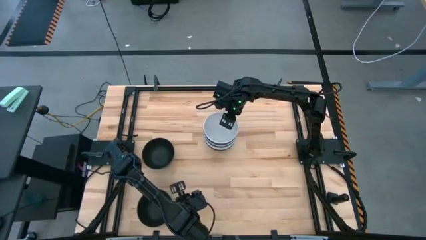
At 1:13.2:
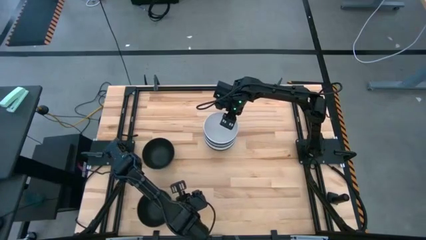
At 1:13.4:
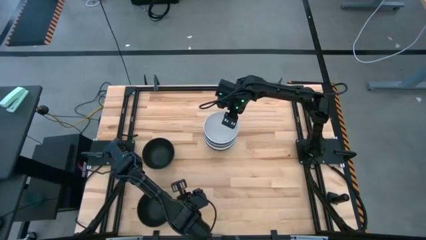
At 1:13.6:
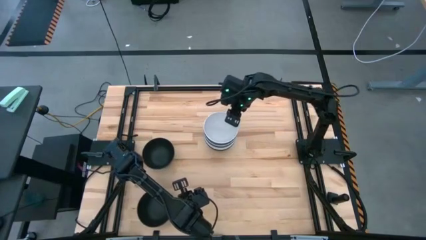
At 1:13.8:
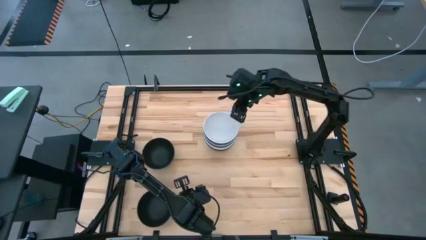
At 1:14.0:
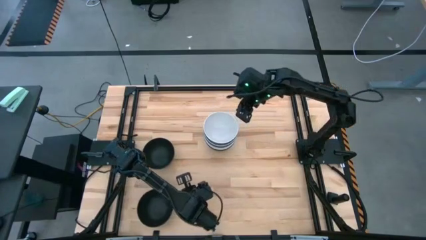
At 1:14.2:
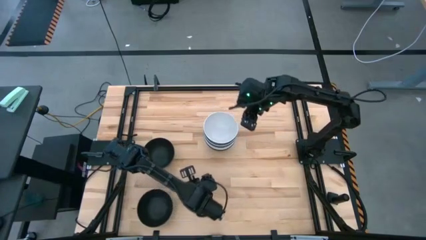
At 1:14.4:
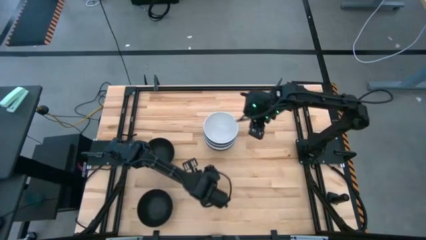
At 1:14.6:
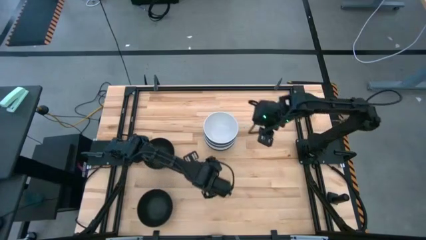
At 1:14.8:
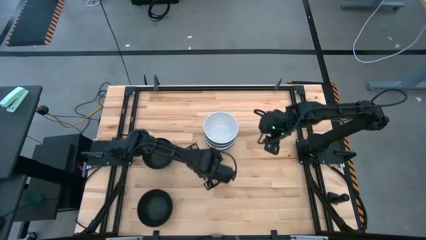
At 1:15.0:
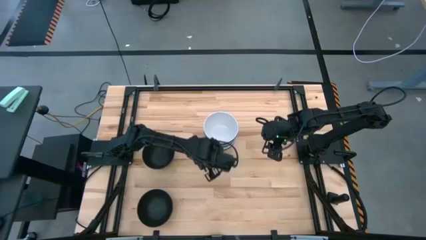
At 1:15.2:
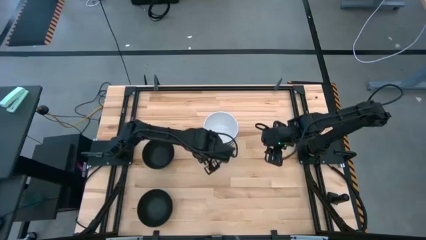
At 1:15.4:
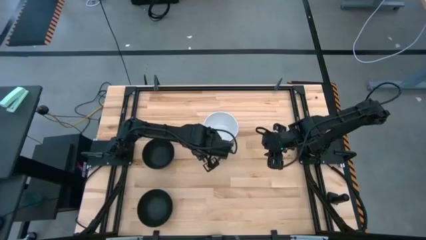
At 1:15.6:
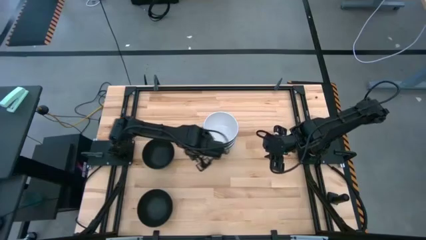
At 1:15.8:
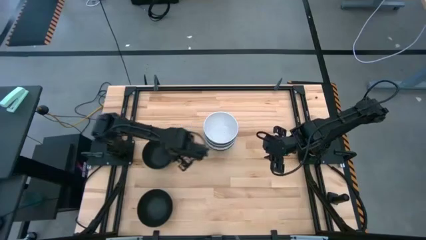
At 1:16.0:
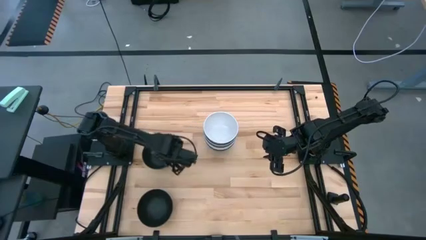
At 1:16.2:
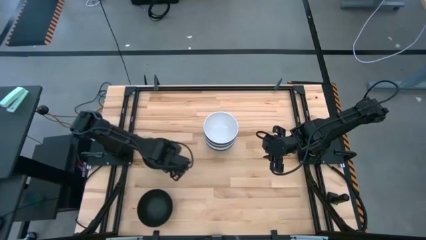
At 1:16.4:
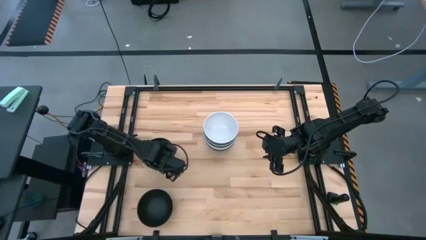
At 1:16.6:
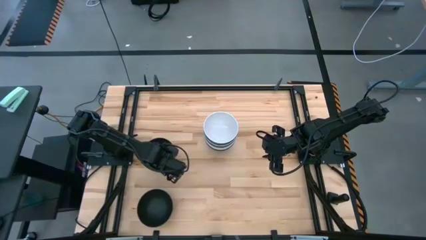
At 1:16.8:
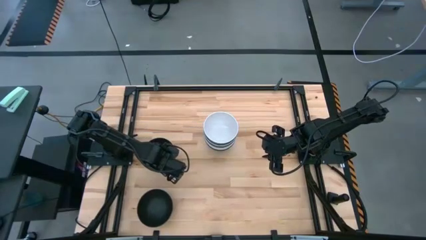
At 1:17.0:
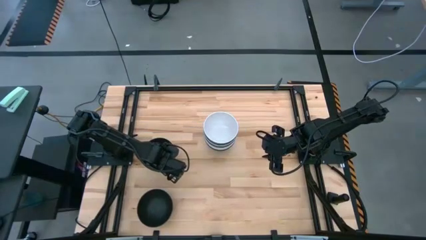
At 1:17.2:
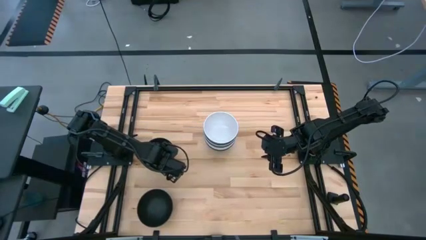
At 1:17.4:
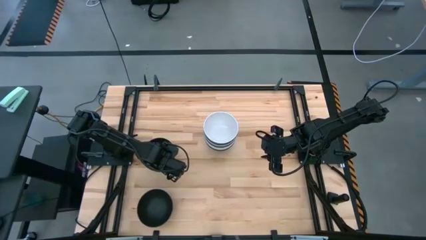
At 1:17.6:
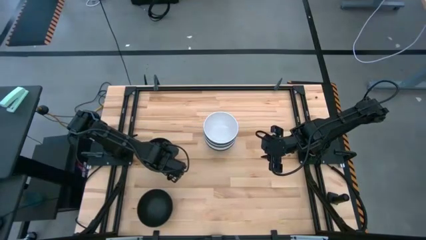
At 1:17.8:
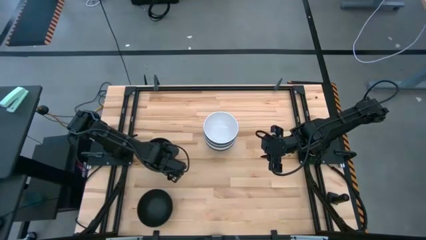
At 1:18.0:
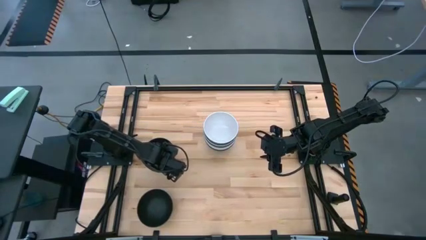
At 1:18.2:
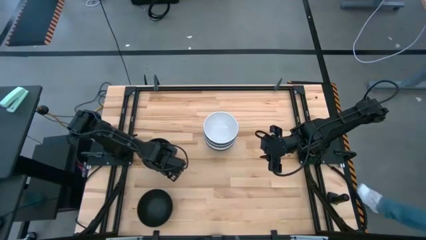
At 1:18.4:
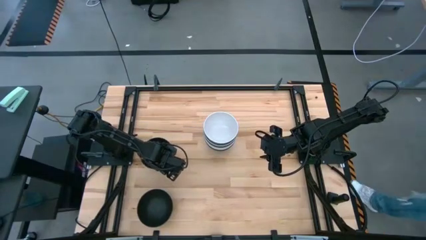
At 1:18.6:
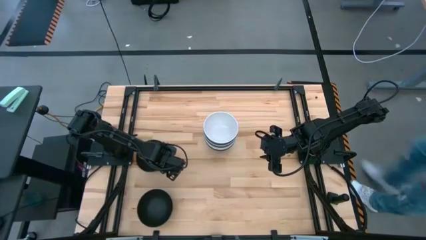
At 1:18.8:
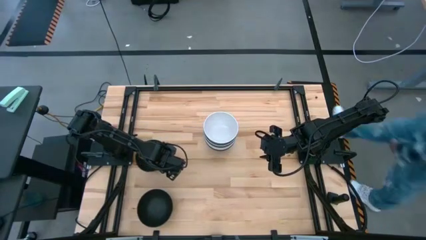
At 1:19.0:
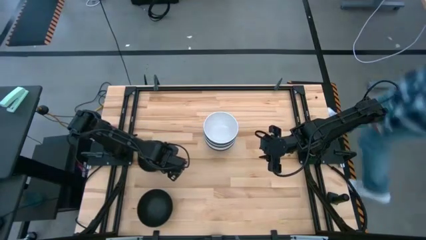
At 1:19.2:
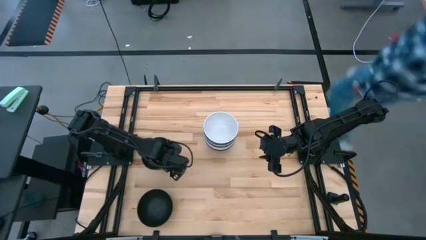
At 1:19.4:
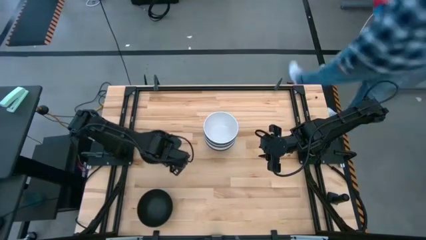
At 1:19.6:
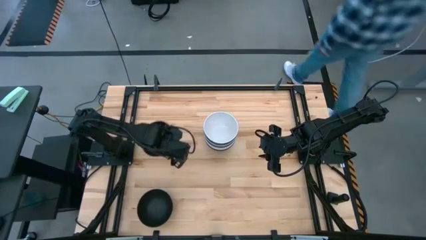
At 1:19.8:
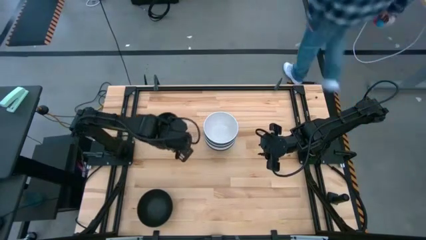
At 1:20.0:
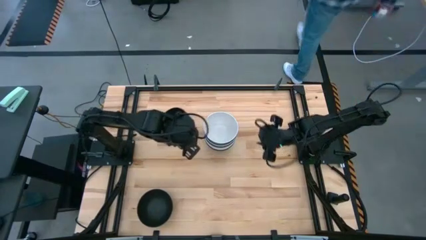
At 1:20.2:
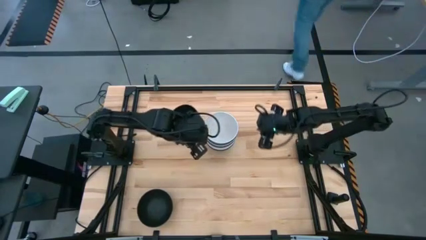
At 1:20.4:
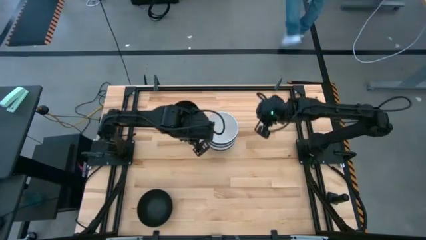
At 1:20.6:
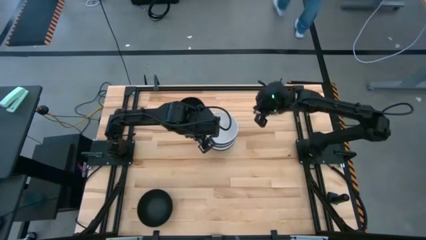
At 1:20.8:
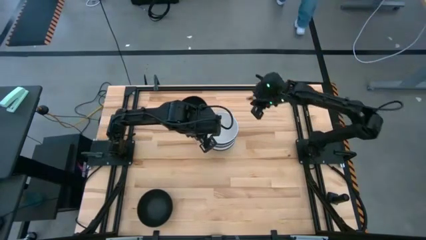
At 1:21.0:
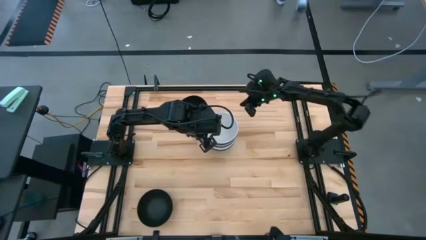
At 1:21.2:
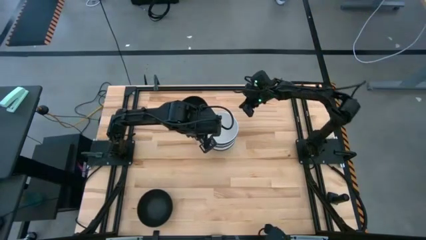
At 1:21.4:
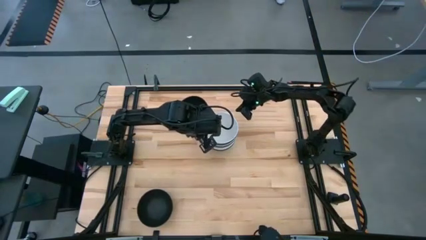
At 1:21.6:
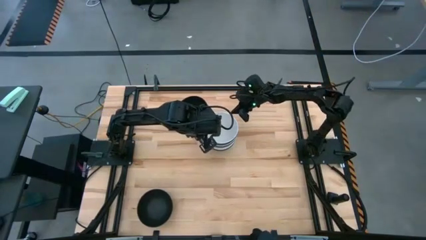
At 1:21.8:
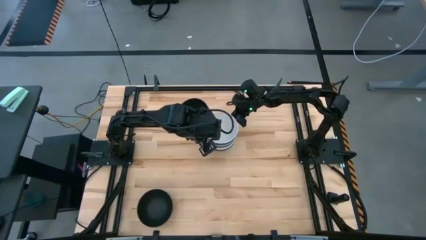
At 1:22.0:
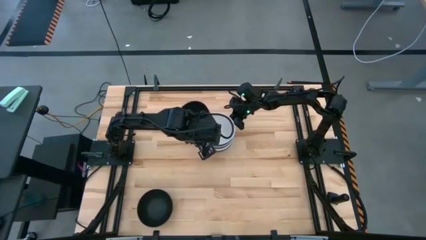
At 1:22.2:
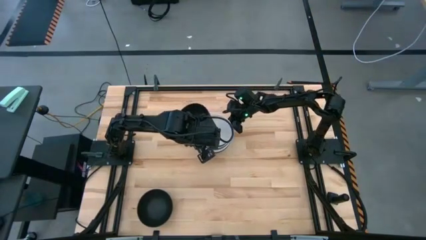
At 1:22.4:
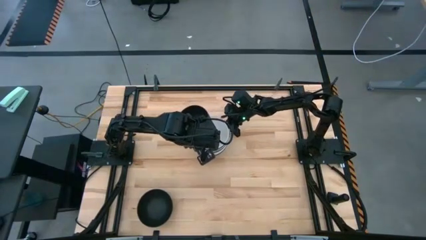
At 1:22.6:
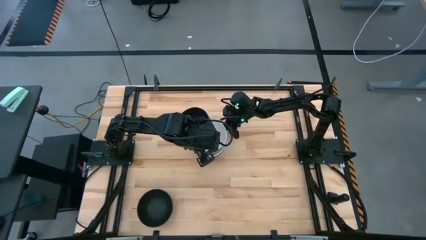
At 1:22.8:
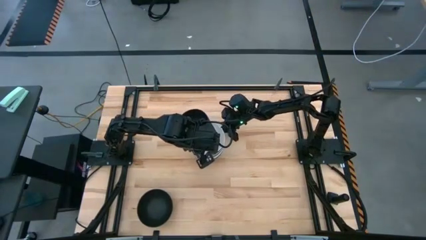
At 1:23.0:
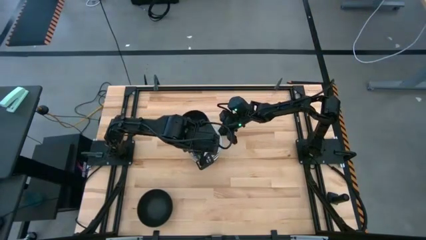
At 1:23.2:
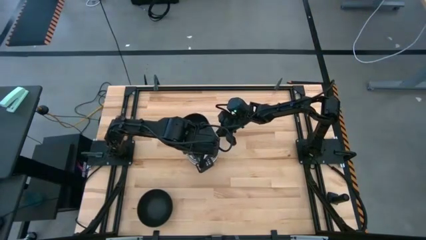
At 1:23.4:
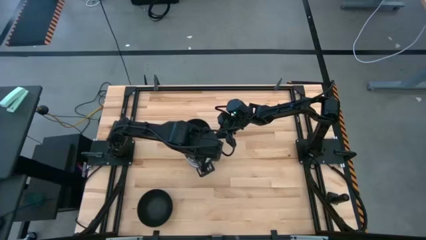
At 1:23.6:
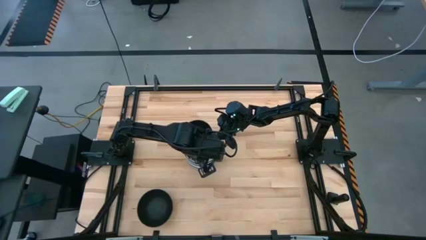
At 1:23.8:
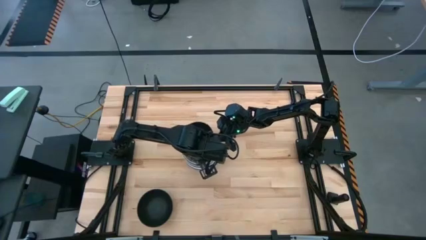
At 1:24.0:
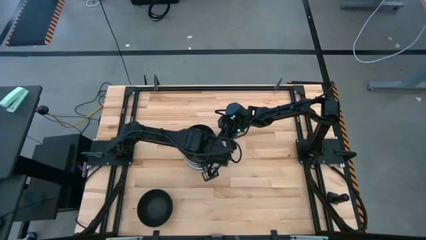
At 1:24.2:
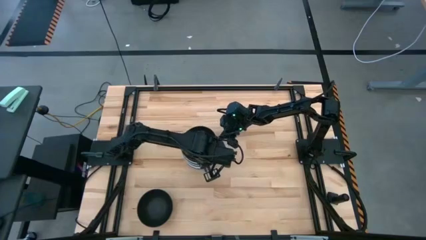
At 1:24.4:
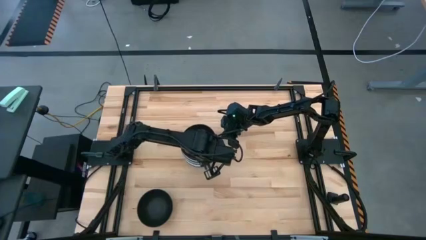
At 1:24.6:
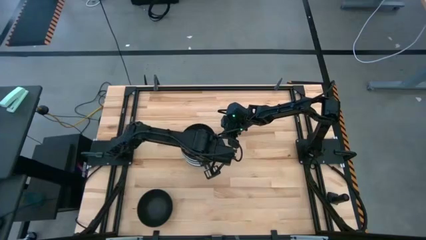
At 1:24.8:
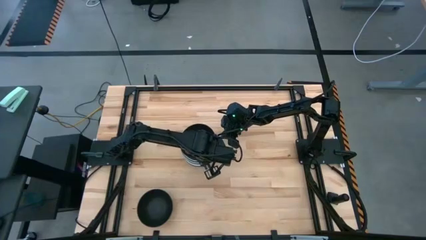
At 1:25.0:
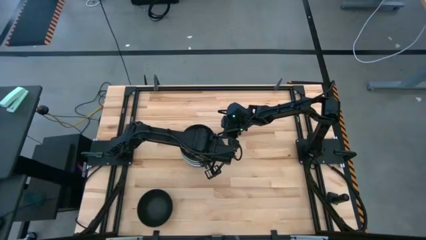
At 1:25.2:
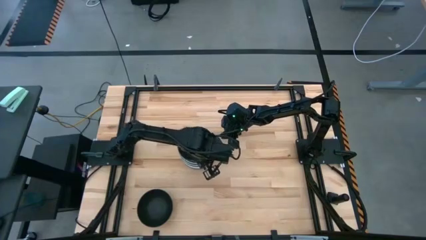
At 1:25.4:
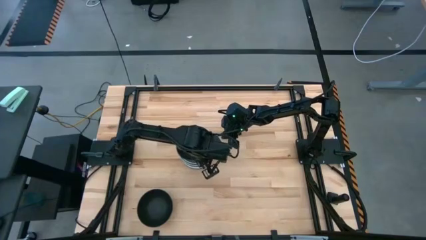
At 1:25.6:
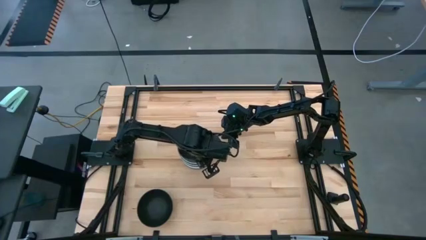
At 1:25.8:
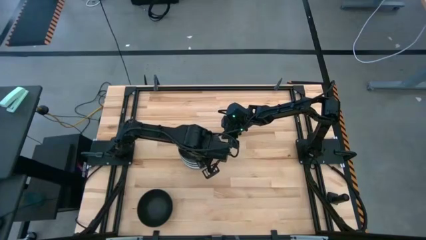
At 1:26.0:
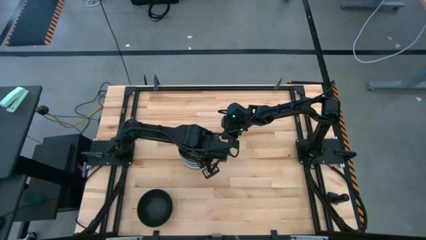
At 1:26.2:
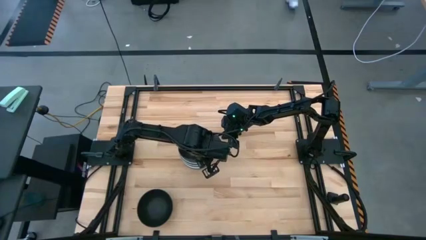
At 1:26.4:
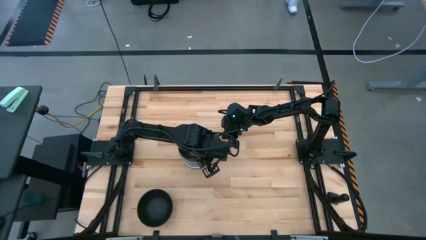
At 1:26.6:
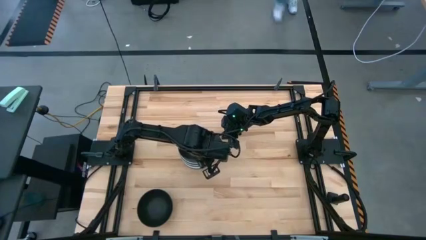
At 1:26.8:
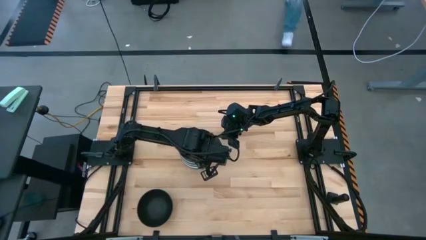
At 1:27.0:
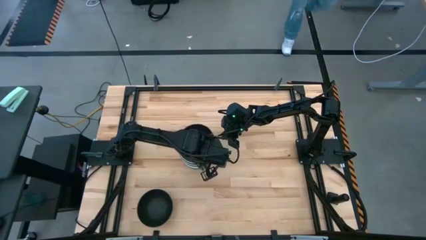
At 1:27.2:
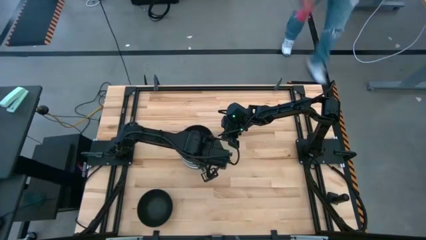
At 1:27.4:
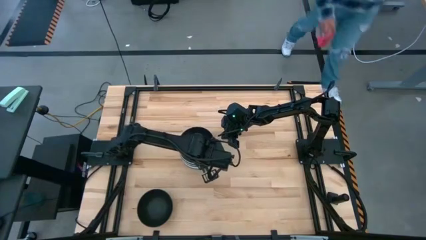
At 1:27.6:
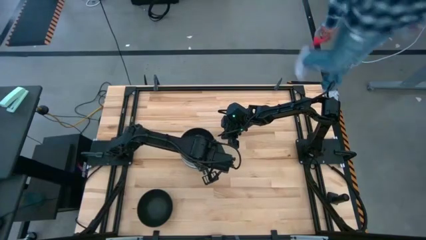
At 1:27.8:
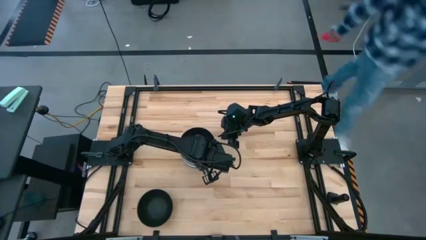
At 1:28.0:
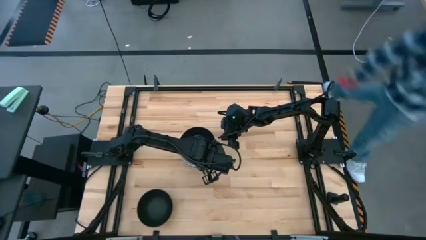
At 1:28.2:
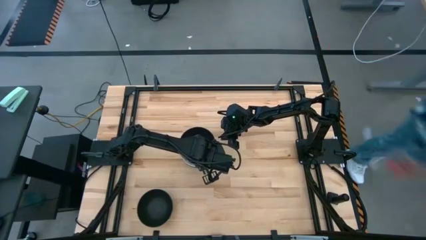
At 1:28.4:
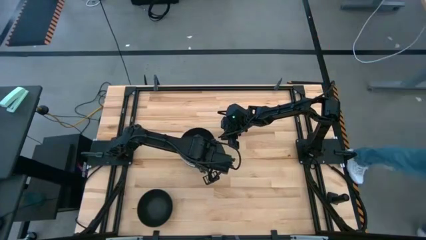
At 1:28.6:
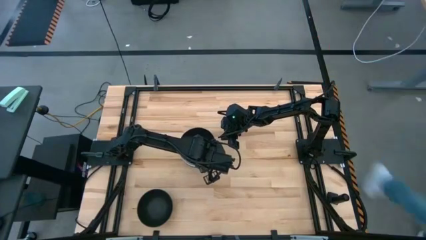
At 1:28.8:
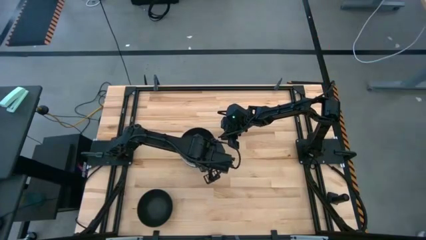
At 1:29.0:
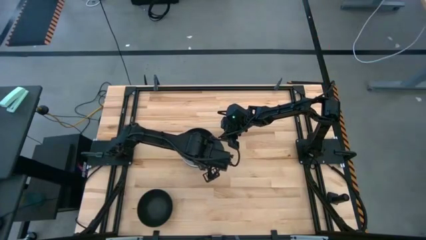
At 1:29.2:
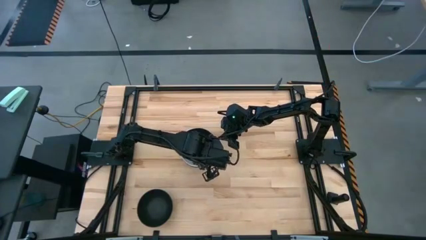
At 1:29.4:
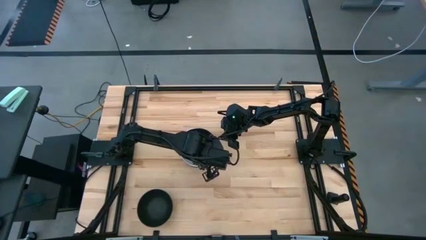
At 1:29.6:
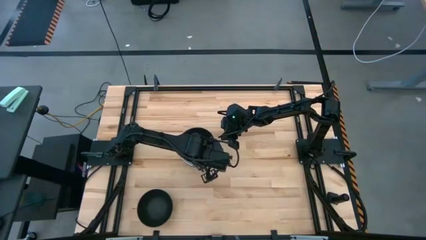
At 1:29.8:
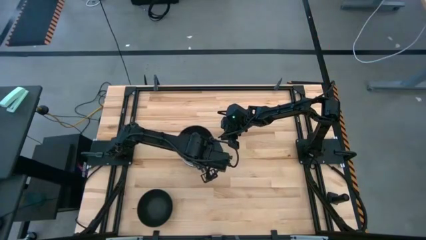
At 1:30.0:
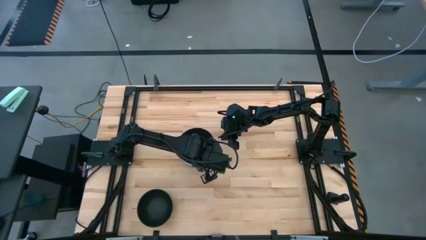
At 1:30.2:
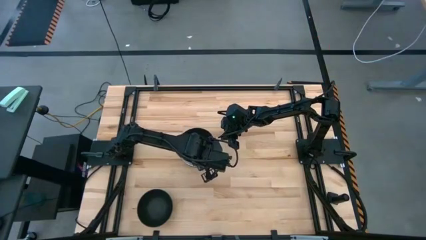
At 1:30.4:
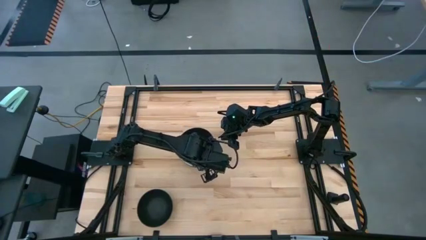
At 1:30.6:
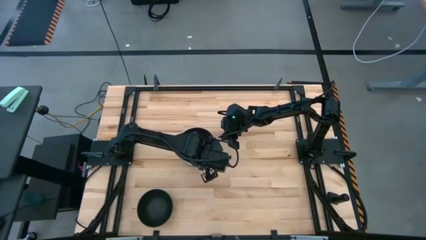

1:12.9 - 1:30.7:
Task: Nest bowls inside each other
Stack the black bowl on top of the white bowls
